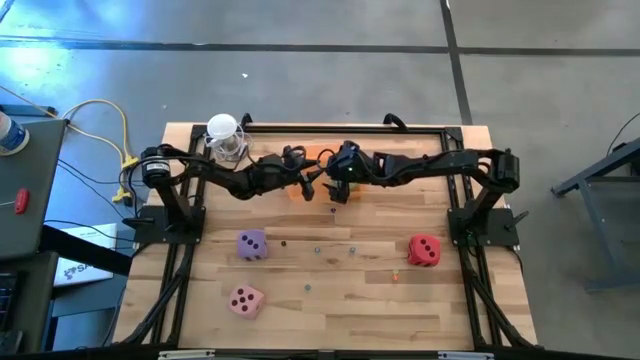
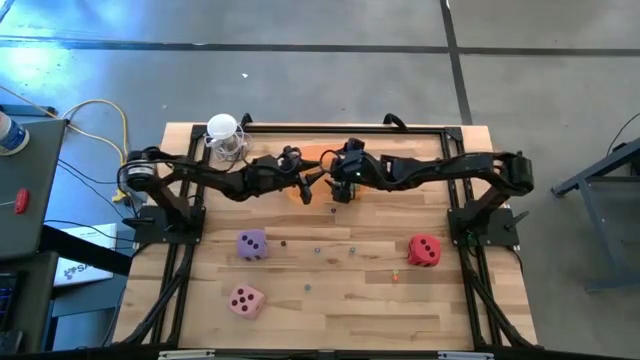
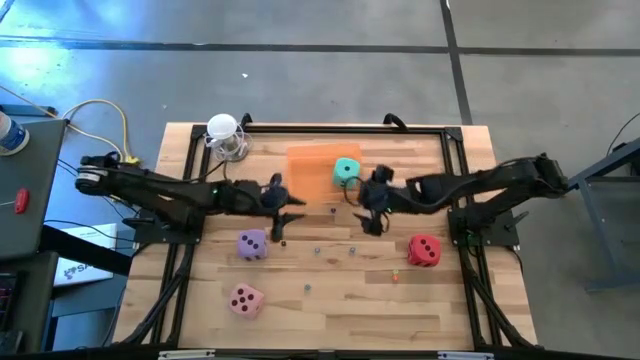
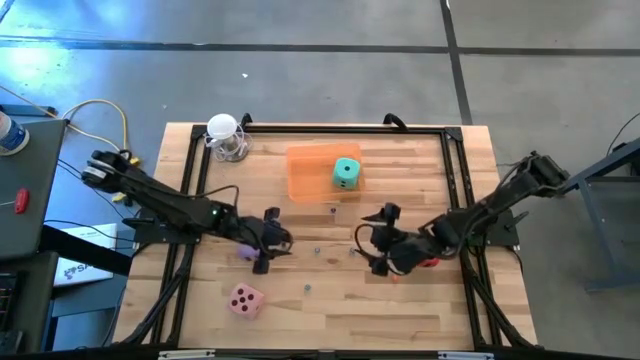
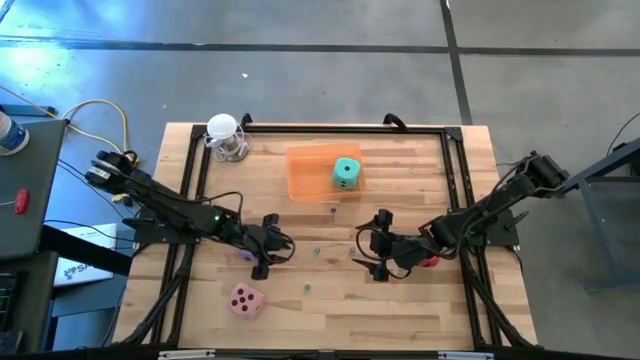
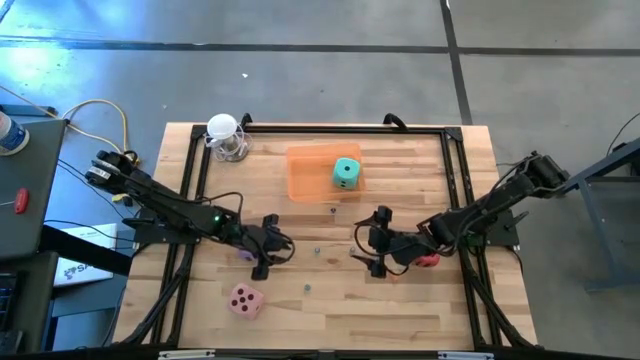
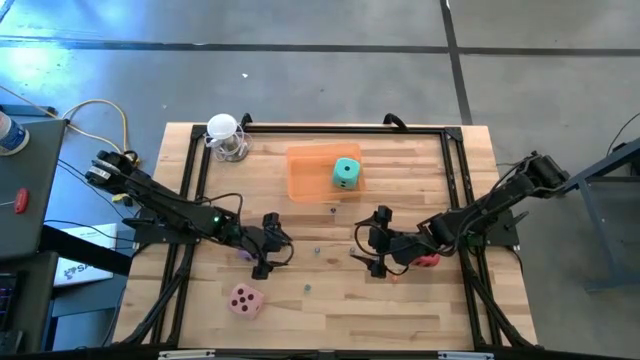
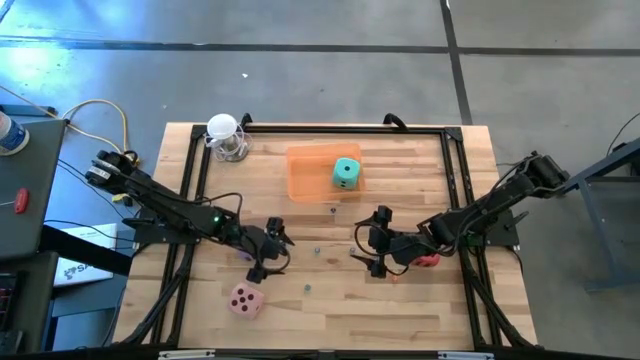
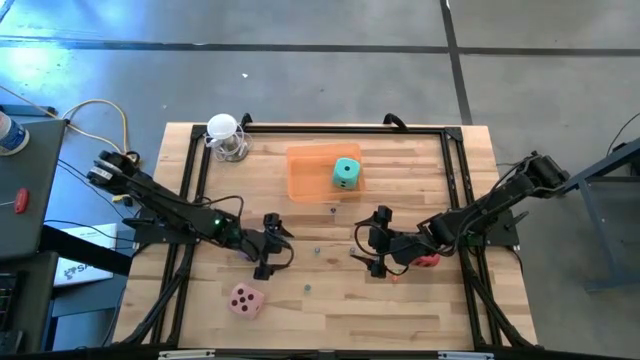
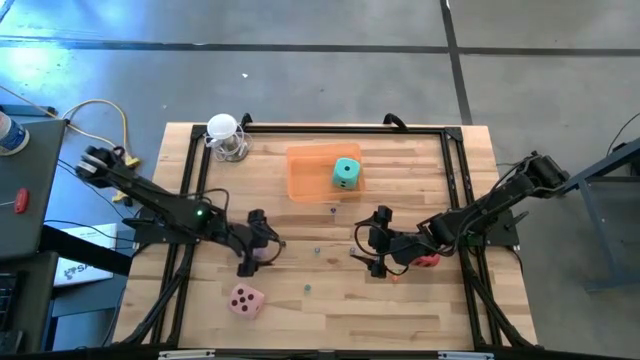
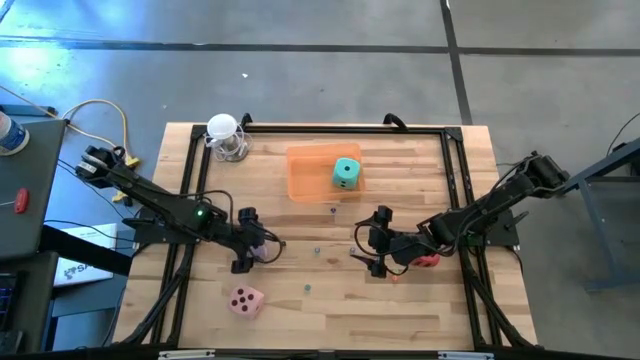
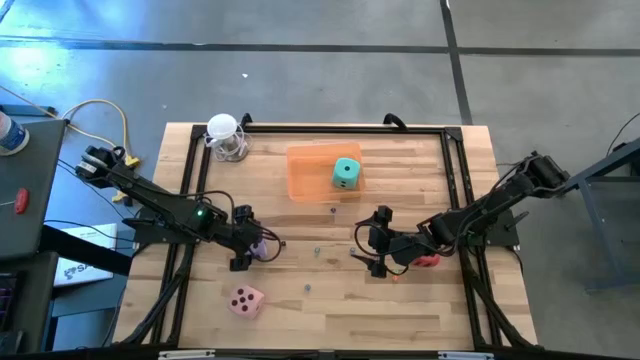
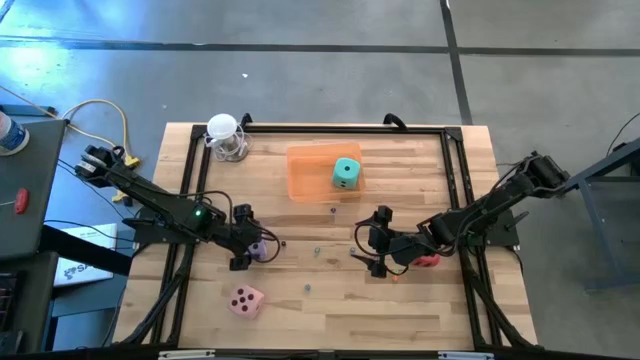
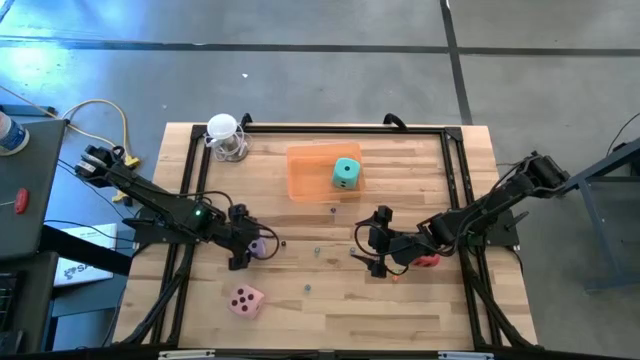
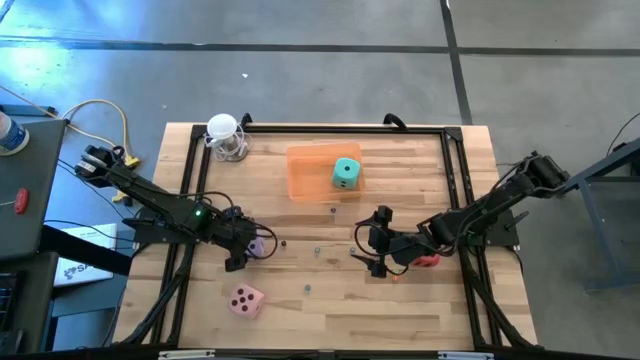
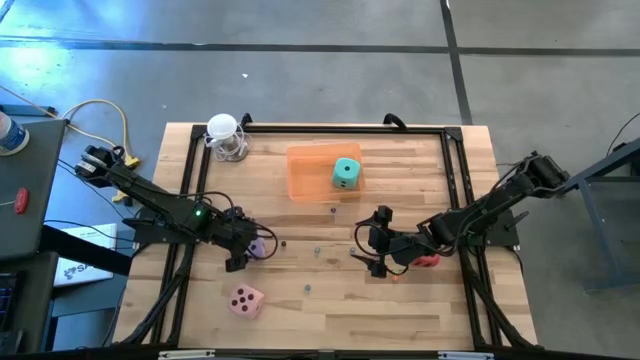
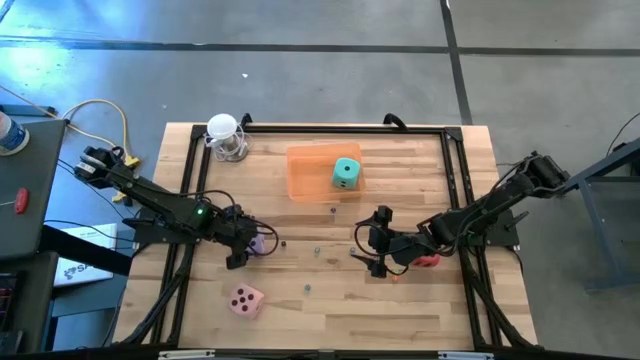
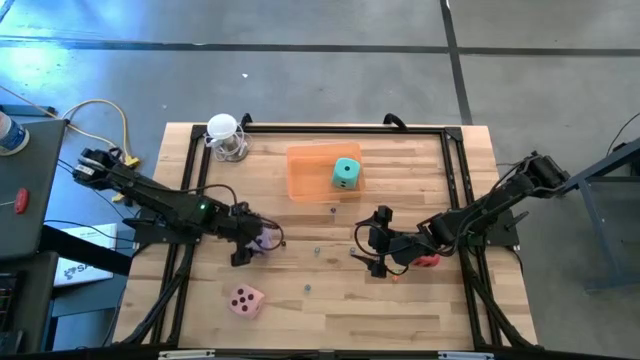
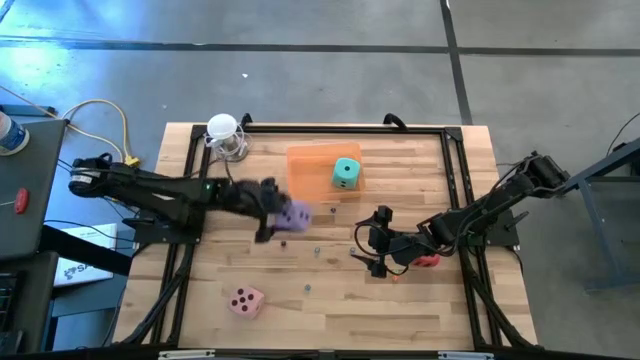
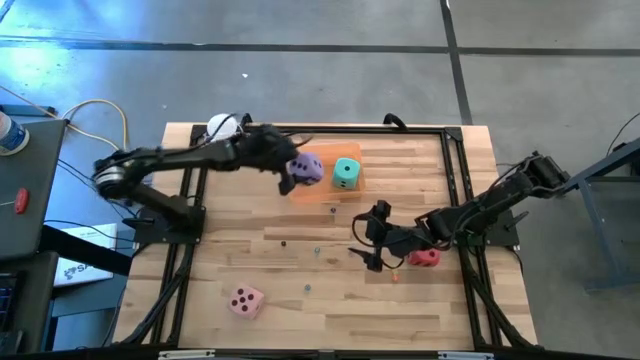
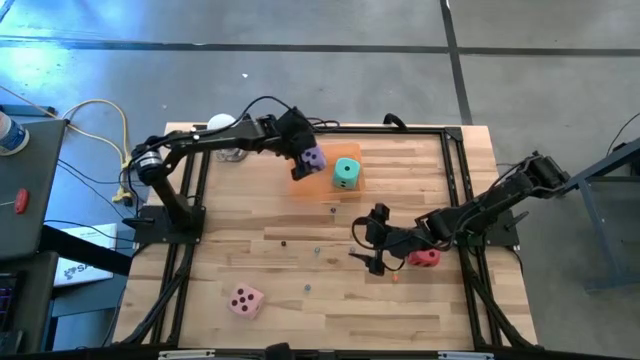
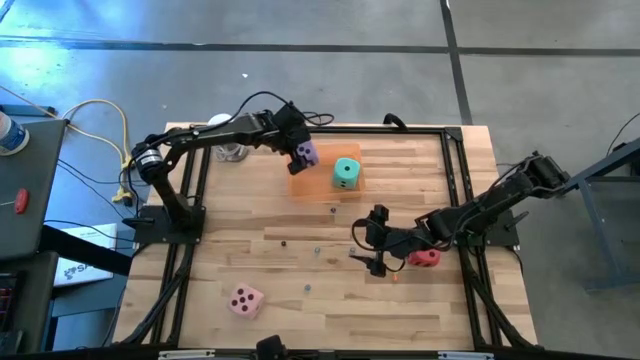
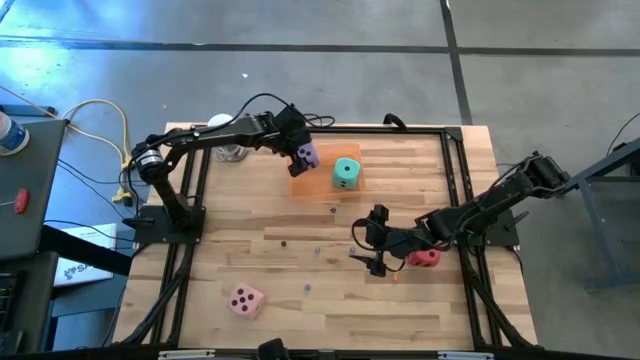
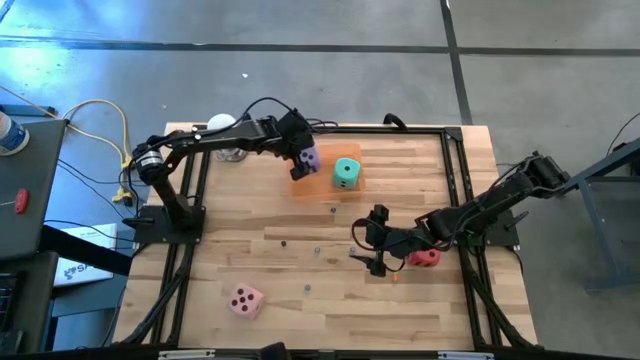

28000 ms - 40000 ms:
Task: Pick & Place Dice
Put the large purple dice into the orange container

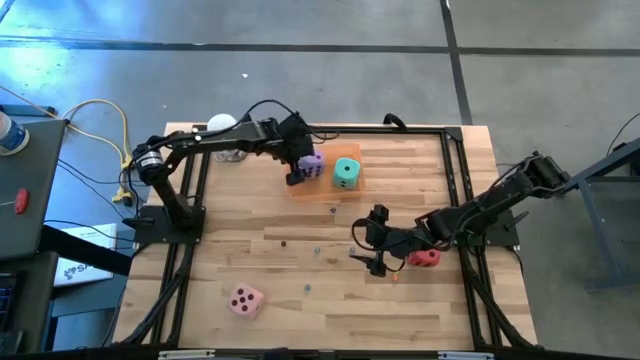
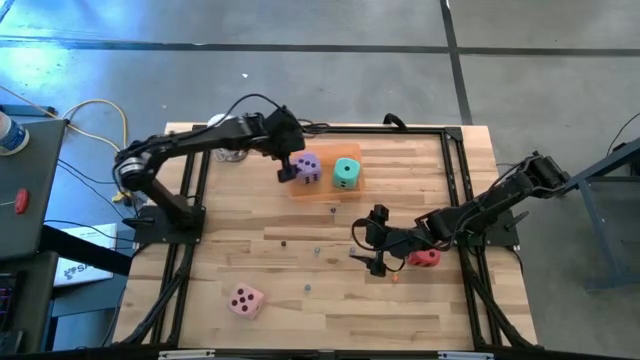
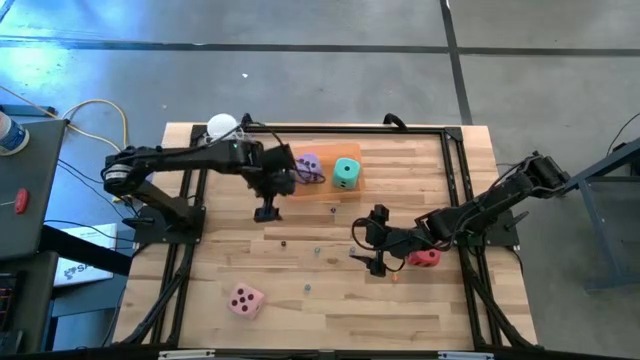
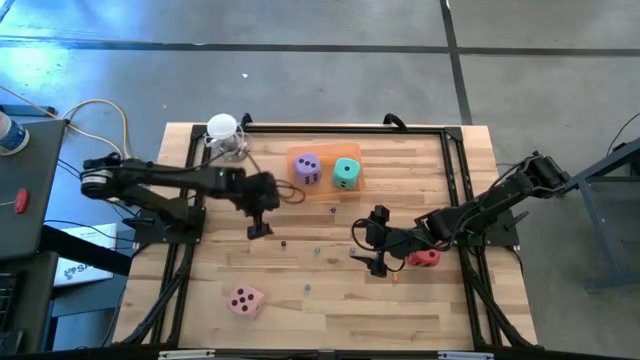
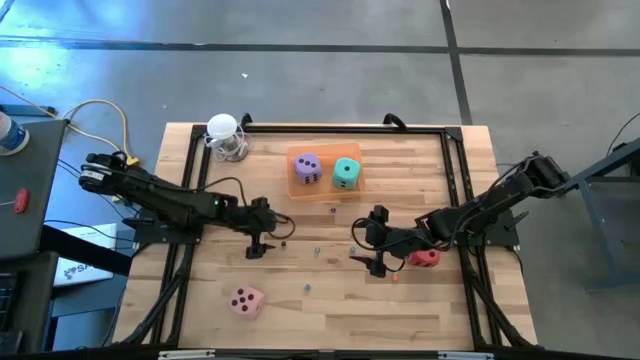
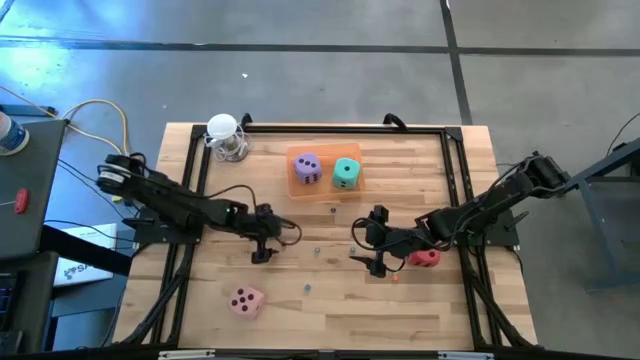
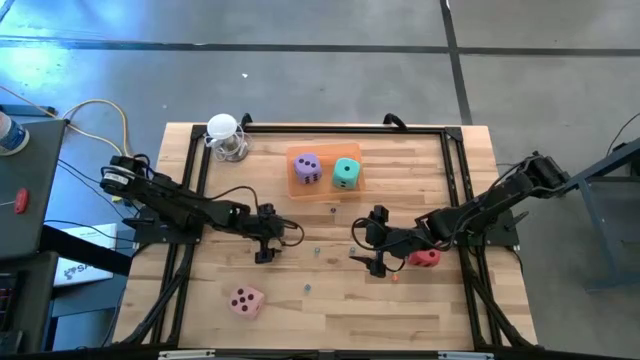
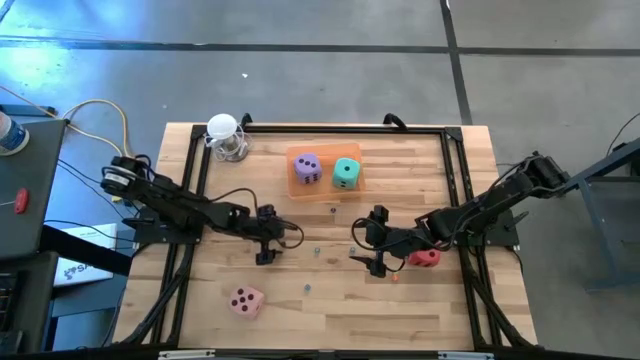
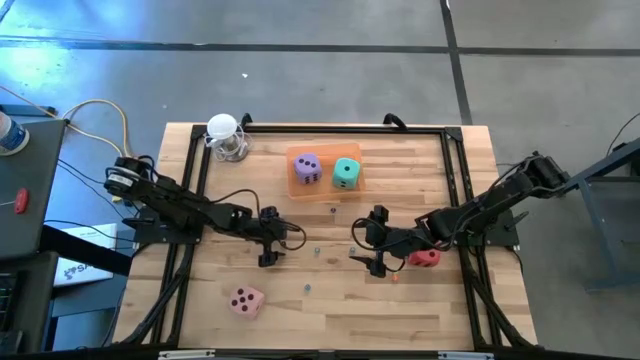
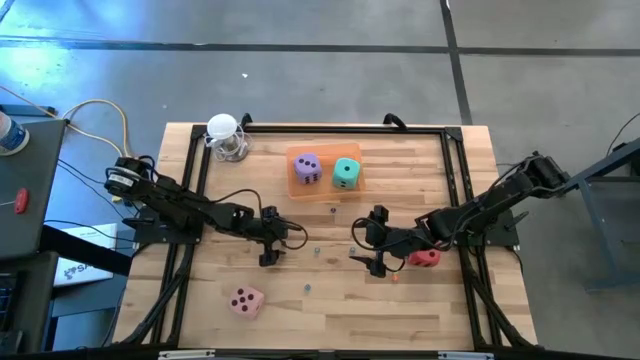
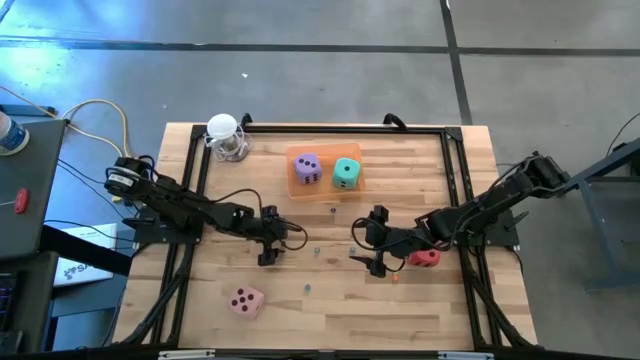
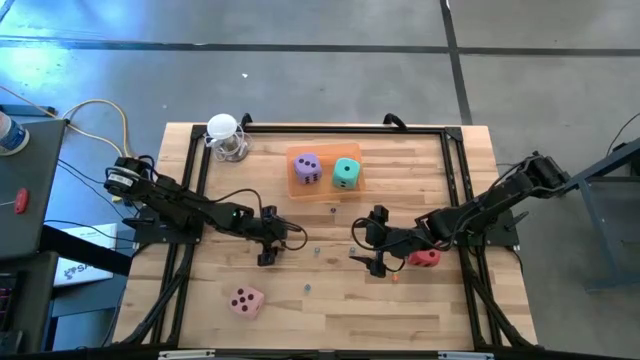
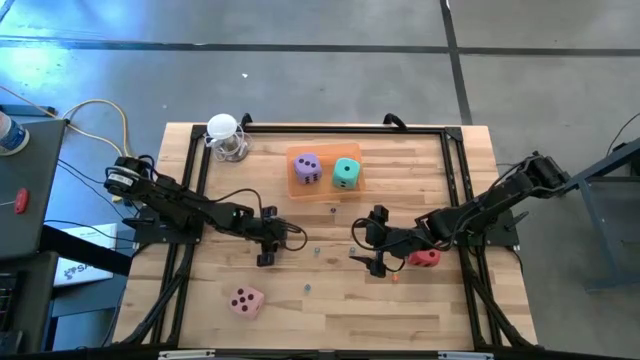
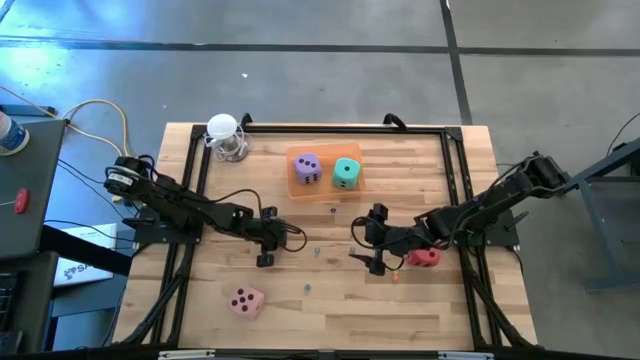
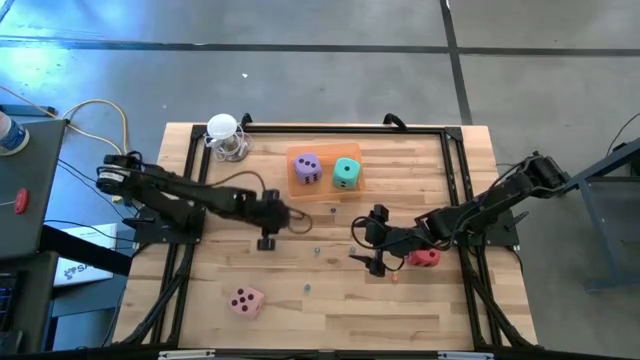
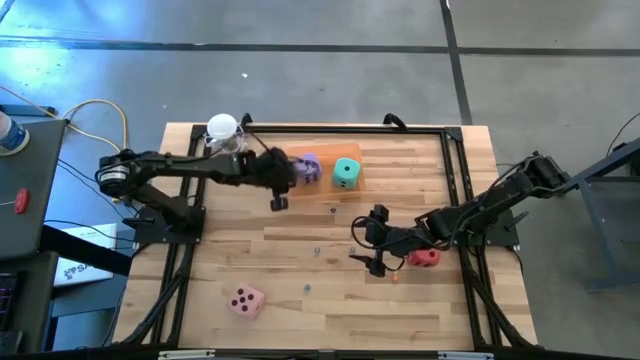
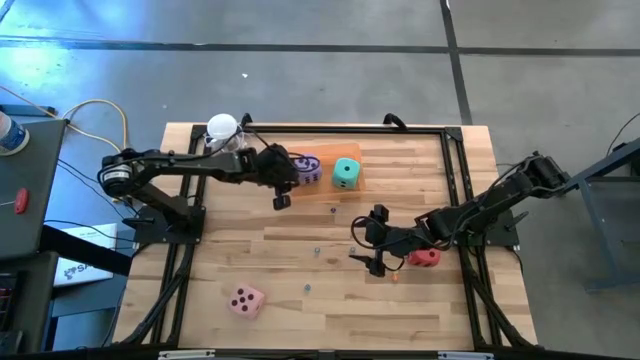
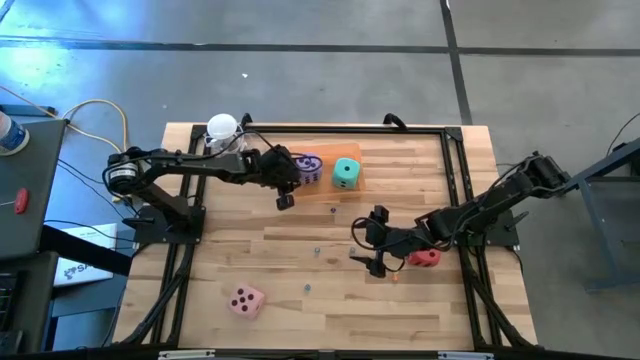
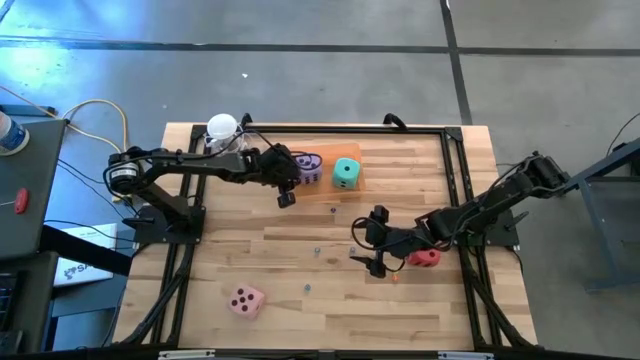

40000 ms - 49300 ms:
Put the small black dice into the orange container
